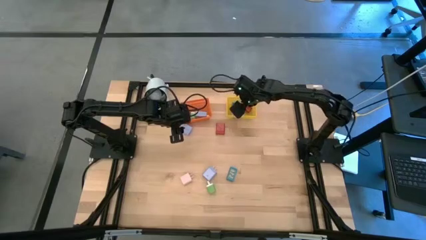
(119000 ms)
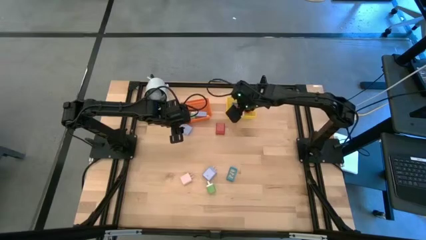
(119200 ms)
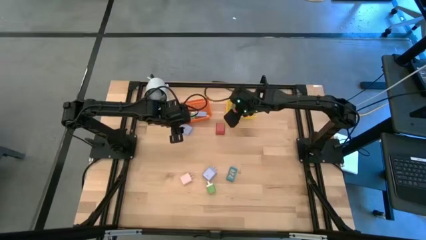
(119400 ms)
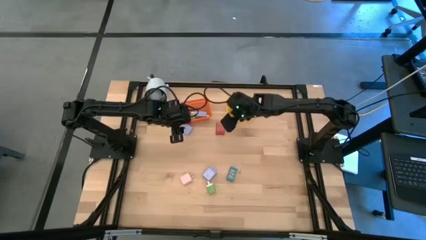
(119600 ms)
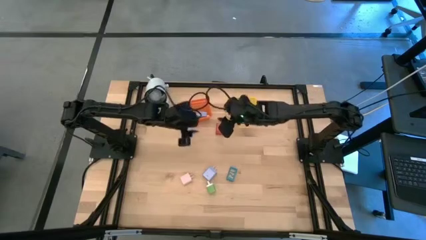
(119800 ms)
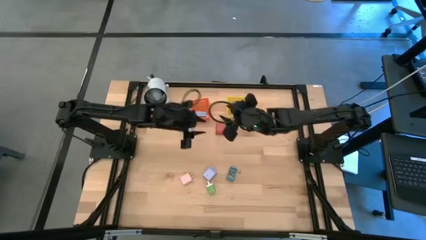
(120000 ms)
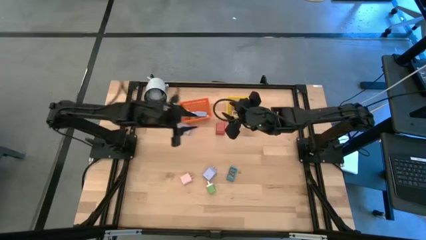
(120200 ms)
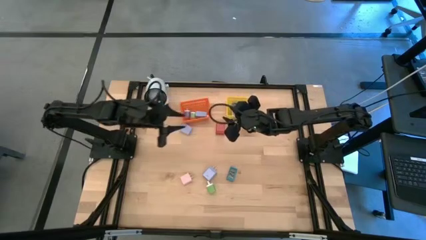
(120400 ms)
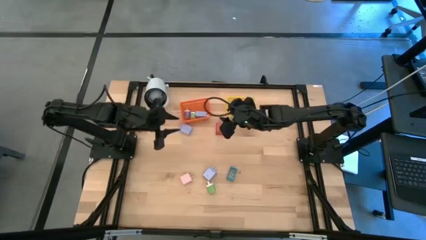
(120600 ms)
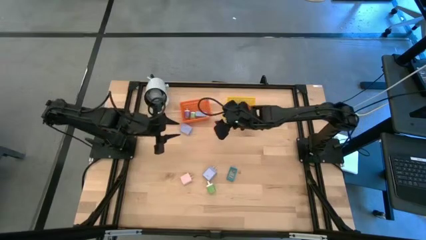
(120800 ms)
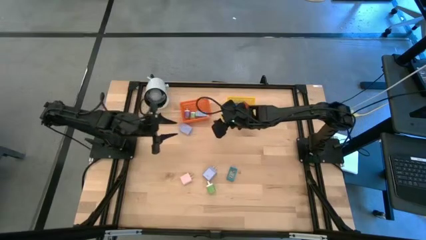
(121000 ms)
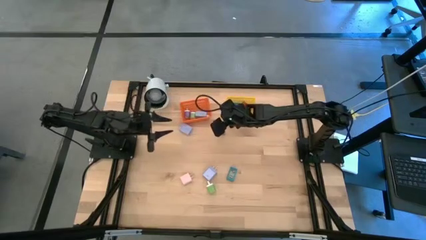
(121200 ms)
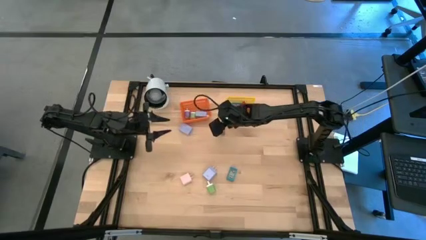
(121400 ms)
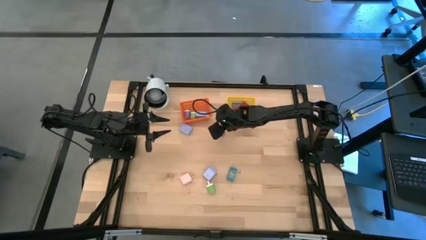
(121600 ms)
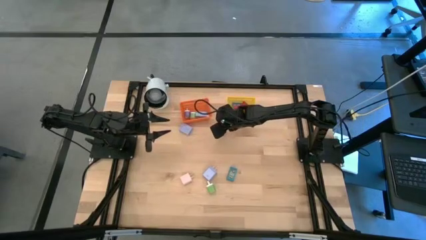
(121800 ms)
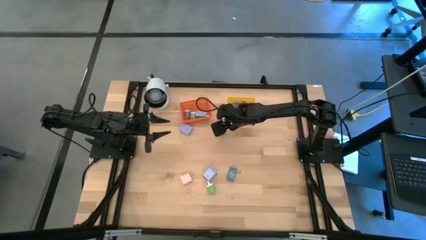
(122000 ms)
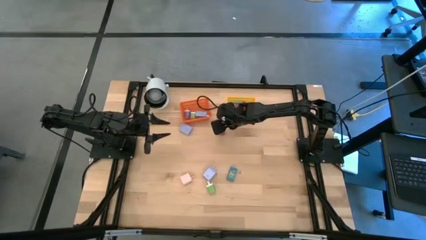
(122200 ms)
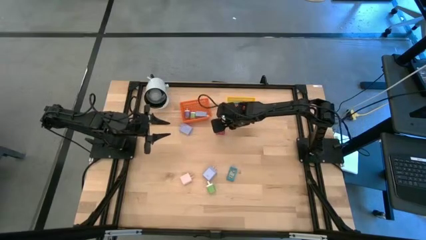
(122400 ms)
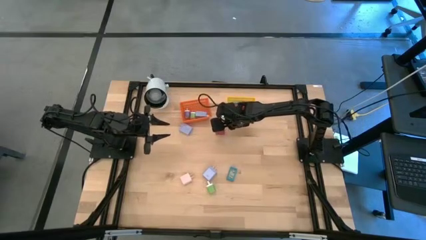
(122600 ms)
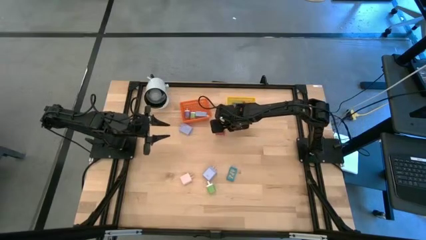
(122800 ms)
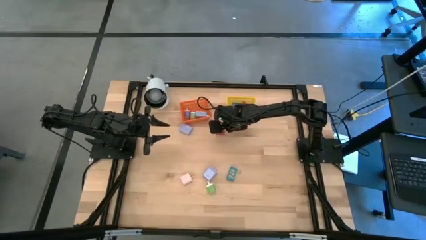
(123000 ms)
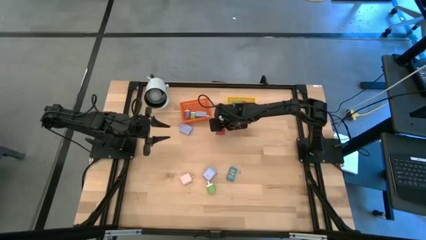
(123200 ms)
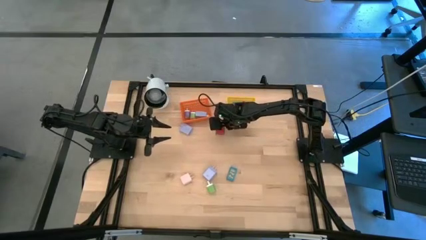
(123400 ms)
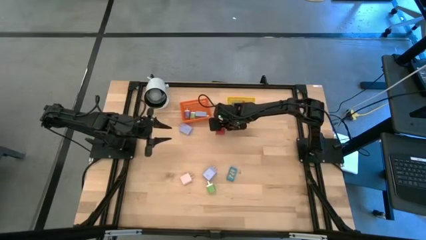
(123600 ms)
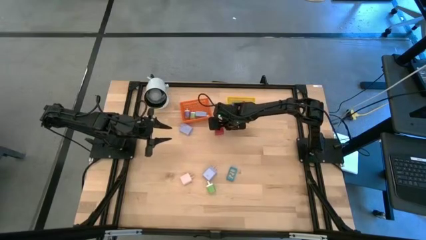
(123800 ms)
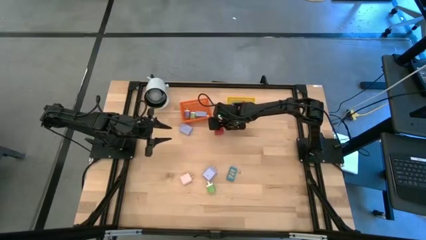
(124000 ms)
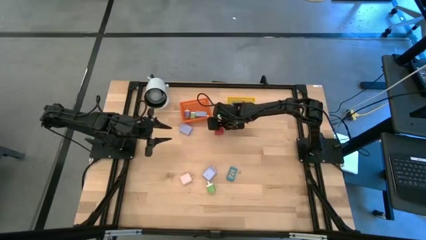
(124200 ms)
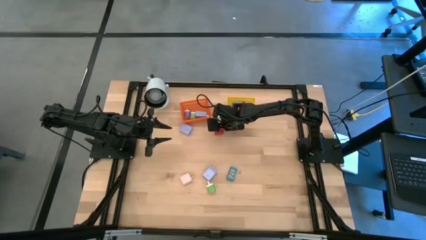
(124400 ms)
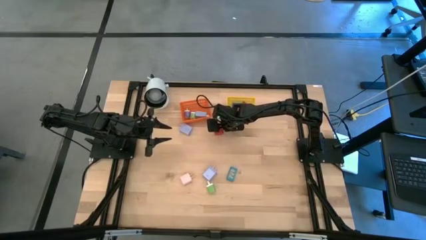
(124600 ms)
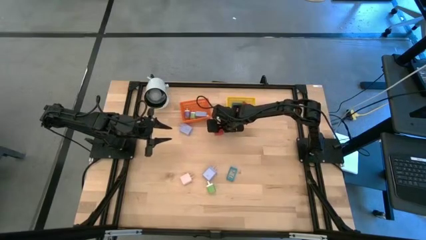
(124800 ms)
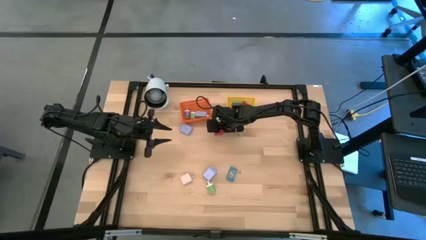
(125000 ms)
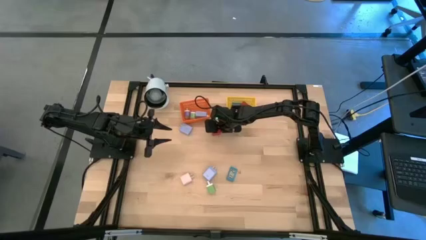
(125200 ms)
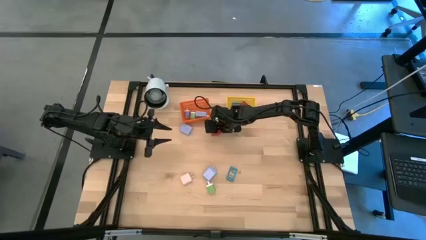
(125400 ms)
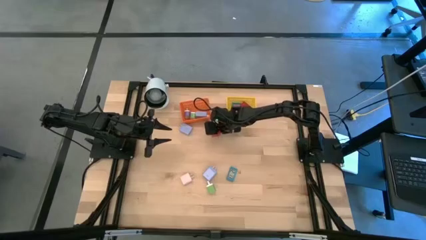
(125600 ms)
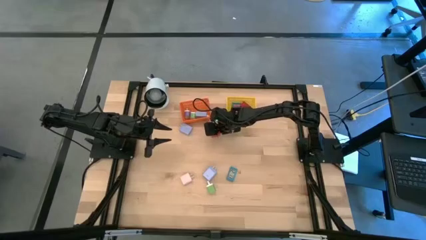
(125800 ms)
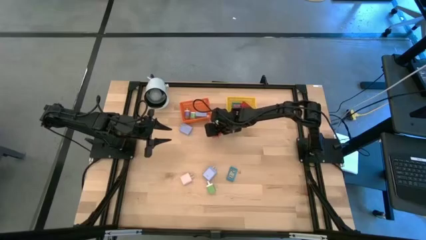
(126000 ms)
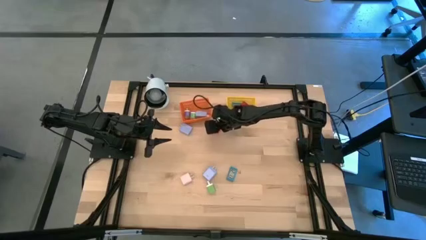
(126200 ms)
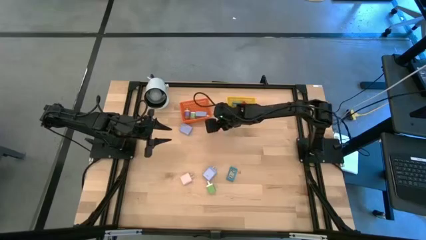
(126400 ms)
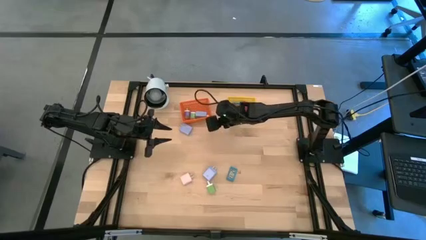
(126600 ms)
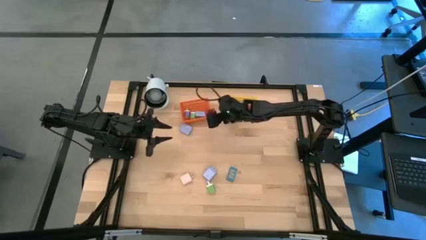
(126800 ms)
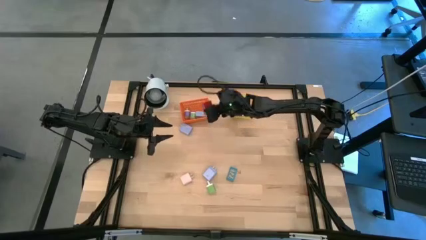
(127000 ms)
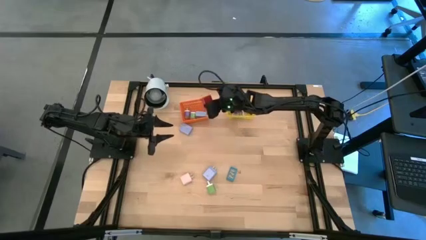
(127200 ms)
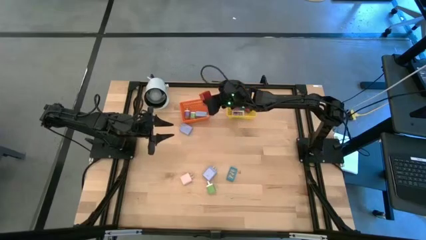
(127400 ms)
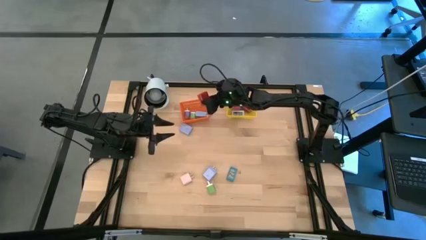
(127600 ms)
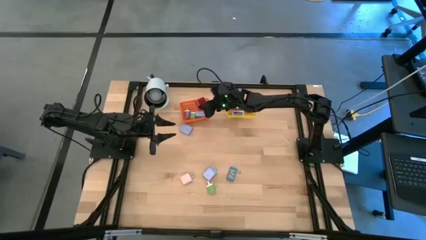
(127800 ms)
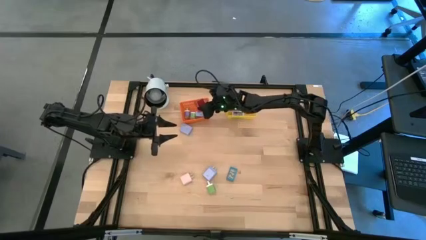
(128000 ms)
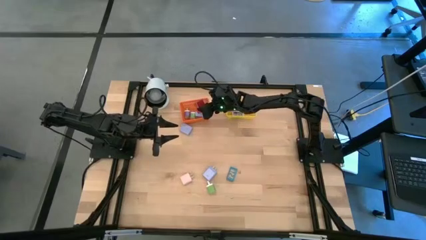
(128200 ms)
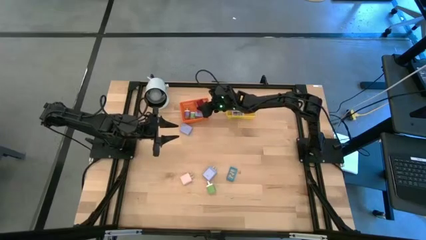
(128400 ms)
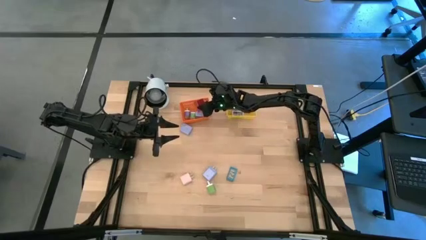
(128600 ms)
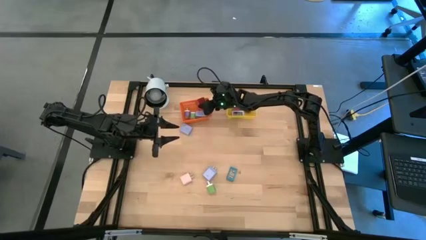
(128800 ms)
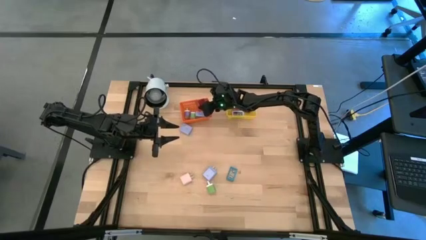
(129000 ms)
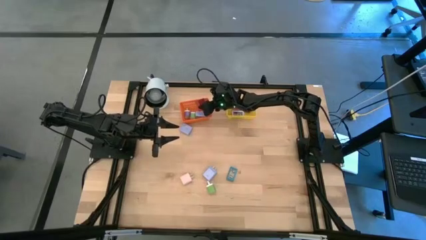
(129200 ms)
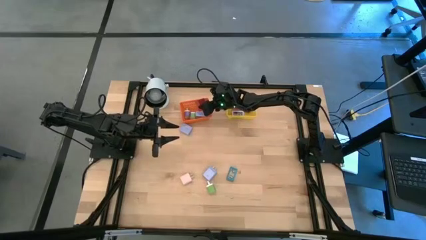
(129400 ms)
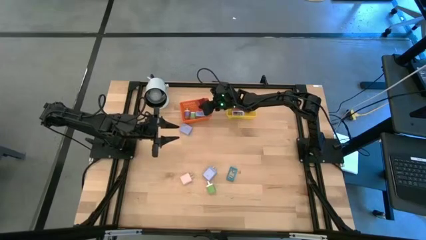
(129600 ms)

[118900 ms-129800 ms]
Task: Pick & Place Office items
Put the red charger adapter into the orange bin

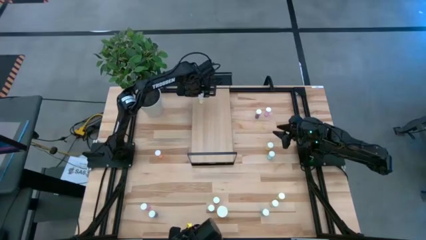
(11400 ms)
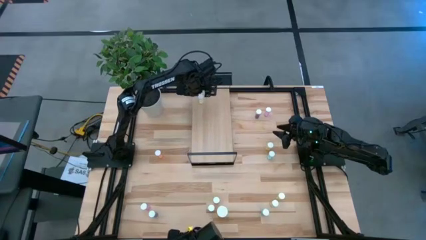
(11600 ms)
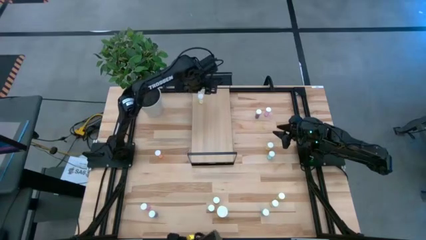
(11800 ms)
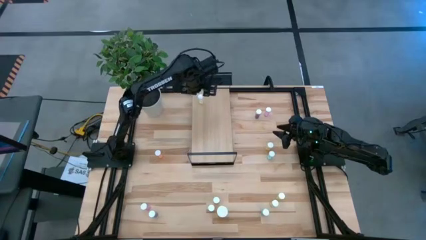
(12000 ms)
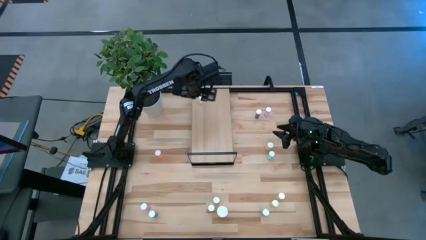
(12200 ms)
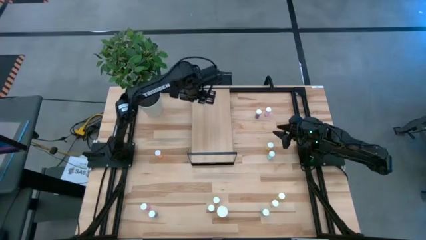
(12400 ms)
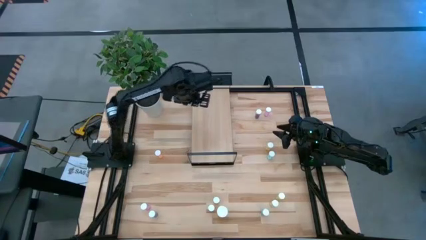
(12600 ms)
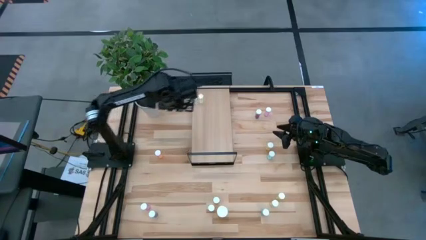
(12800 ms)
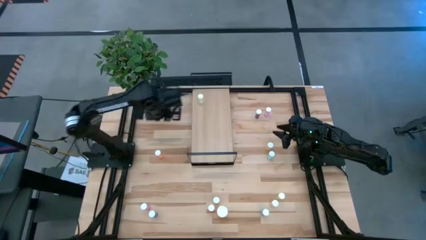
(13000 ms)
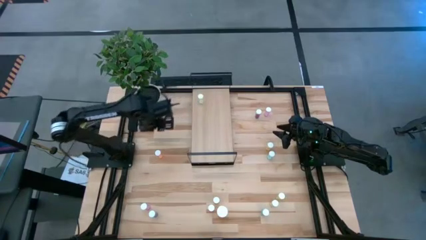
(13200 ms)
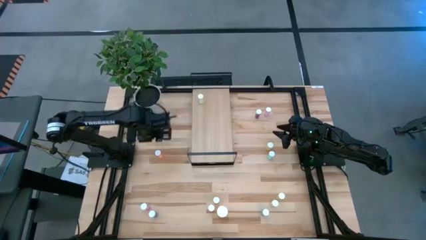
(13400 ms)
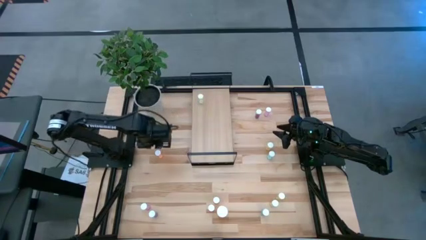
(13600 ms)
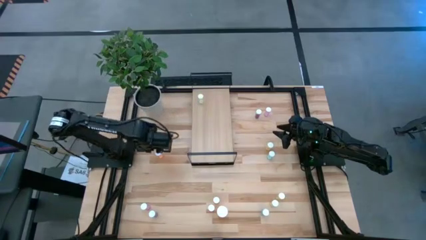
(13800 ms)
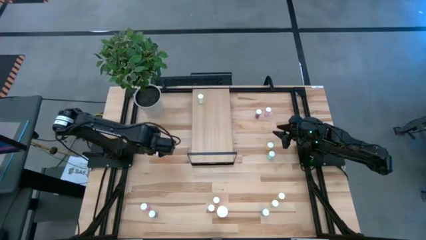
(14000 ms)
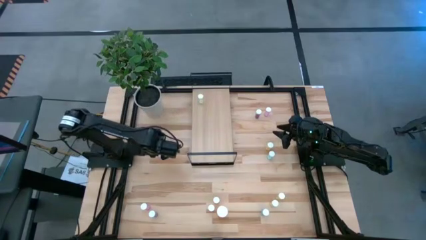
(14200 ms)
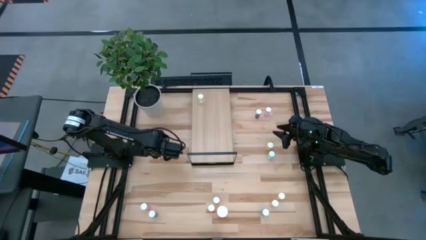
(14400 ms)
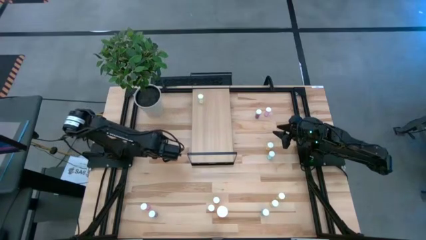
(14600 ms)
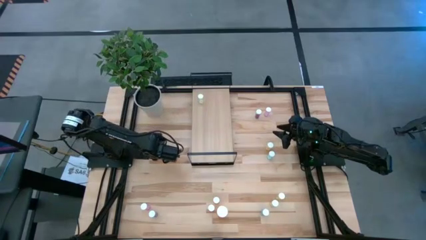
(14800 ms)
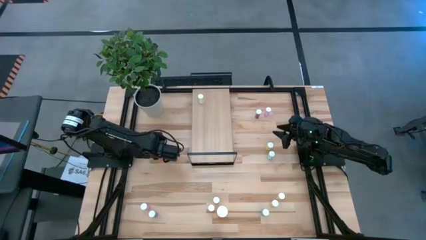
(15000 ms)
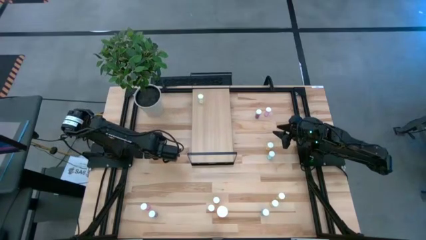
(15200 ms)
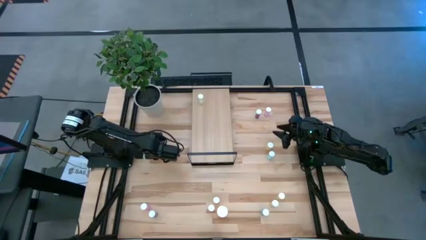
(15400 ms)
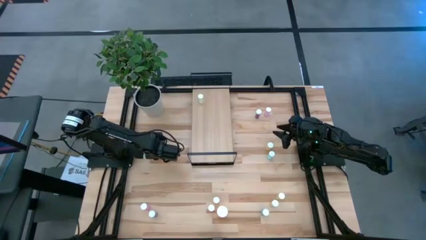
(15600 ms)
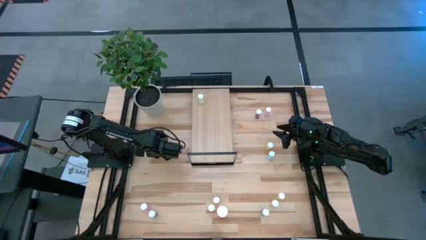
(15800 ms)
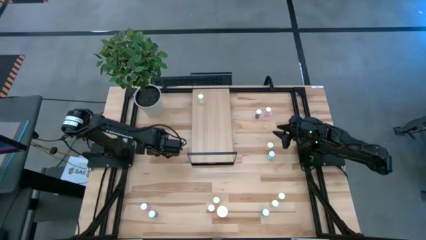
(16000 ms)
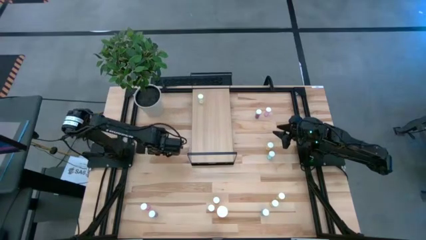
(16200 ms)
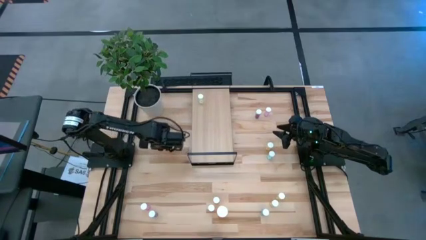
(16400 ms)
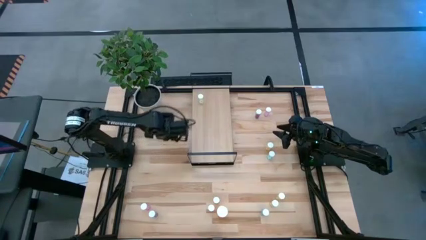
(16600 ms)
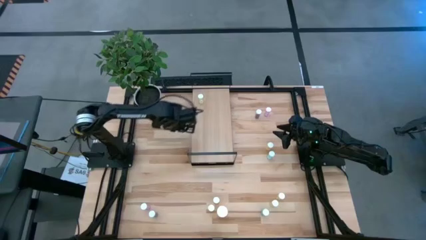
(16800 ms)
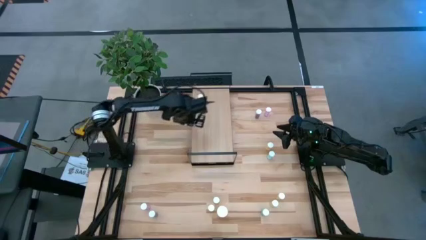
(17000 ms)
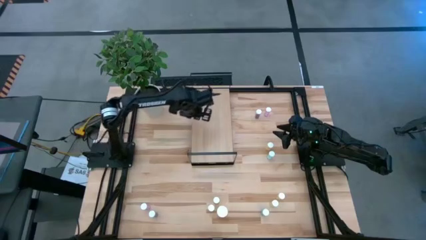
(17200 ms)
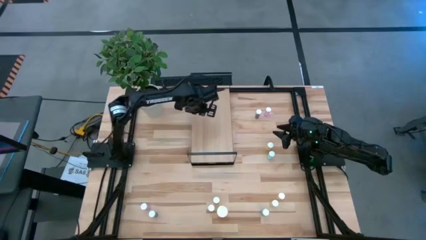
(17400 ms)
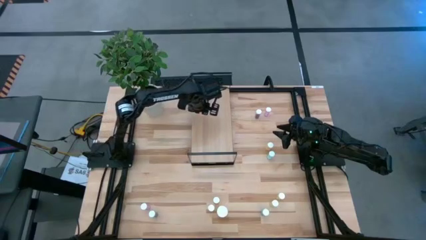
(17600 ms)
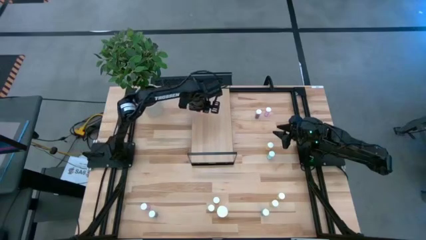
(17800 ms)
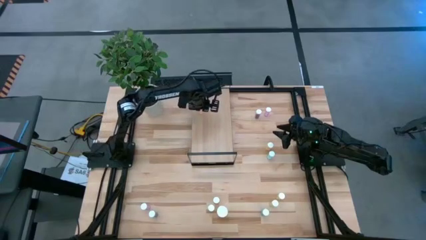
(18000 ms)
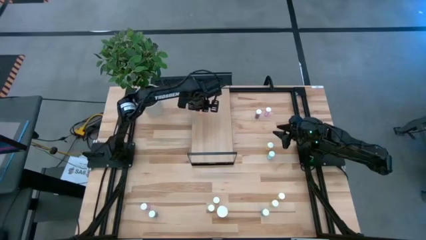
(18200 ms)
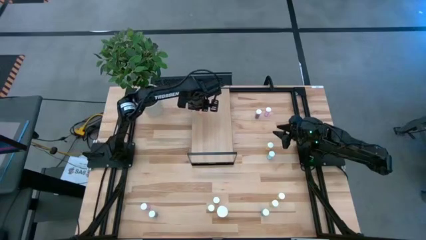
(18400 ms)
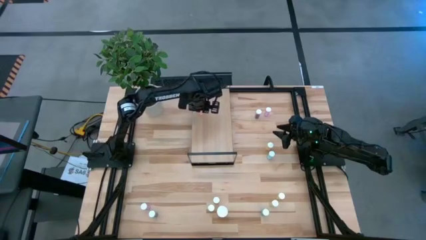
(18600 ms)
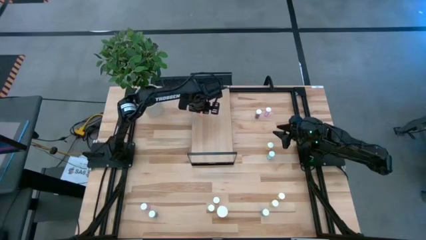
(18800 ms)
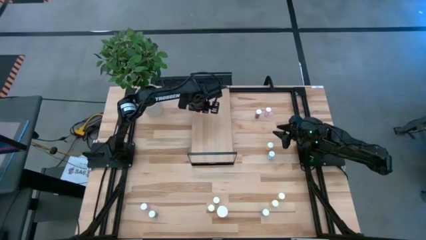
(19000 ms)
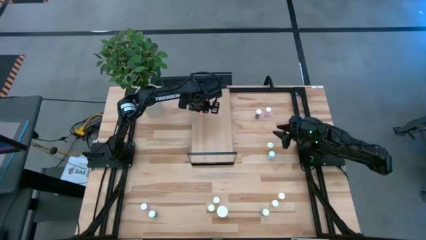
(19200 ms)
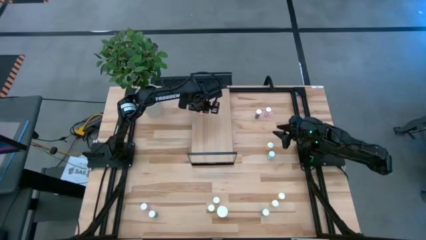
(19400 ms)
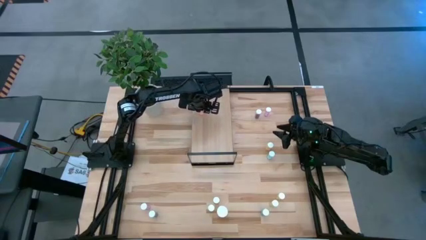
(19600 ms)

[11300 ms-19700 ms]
Task: Pick and place medicine bottles onto shelf by color
Put the red pill bottle on the shelf
